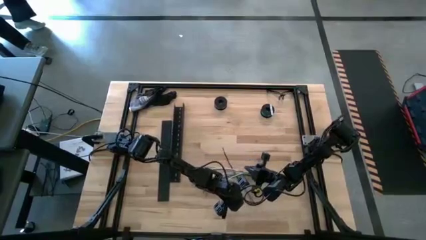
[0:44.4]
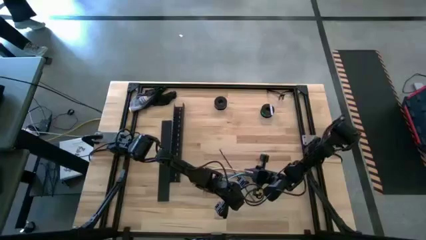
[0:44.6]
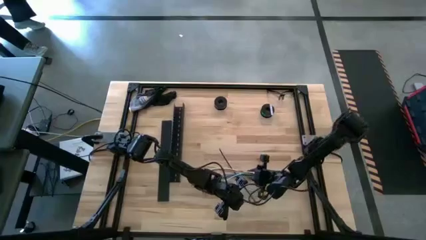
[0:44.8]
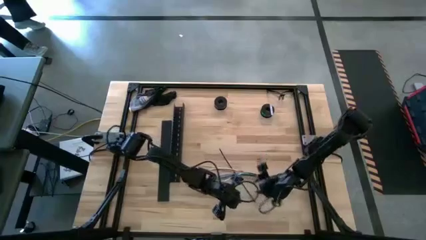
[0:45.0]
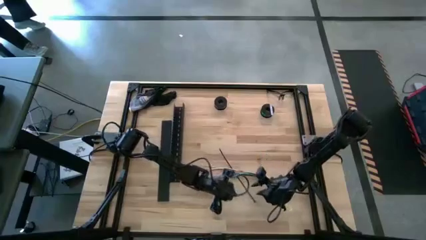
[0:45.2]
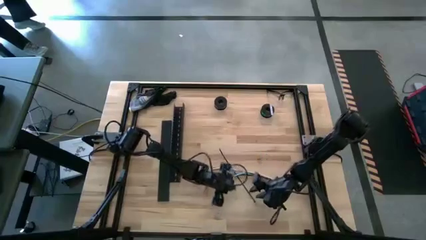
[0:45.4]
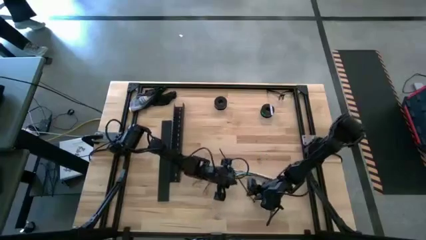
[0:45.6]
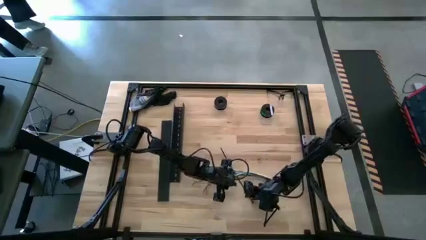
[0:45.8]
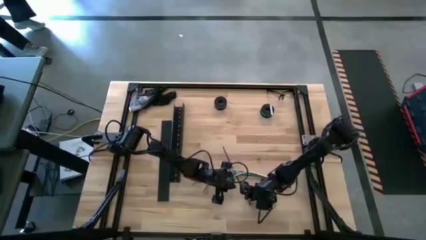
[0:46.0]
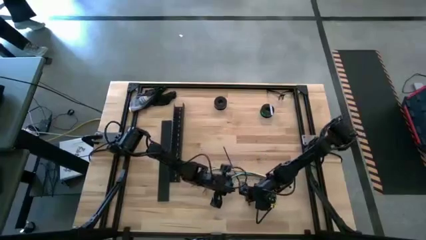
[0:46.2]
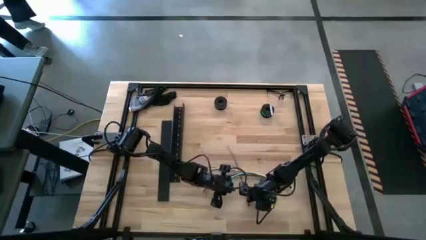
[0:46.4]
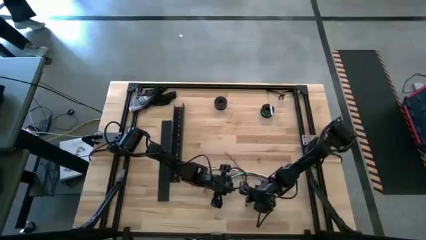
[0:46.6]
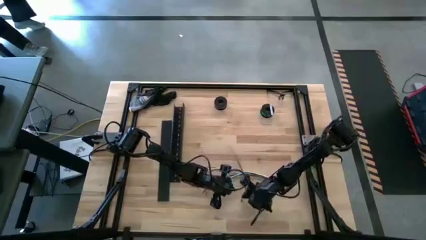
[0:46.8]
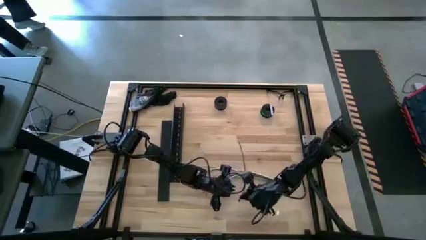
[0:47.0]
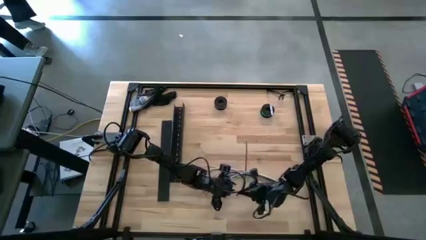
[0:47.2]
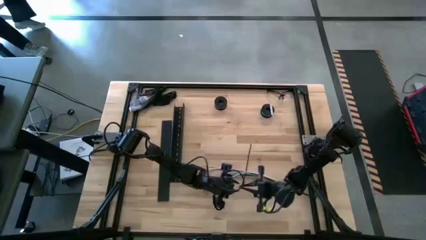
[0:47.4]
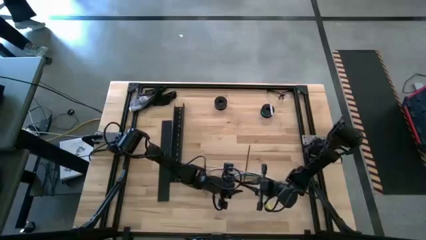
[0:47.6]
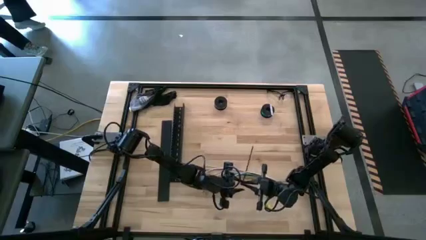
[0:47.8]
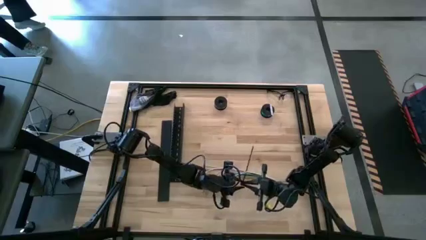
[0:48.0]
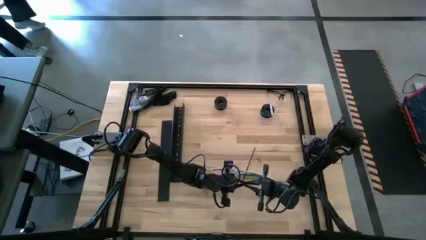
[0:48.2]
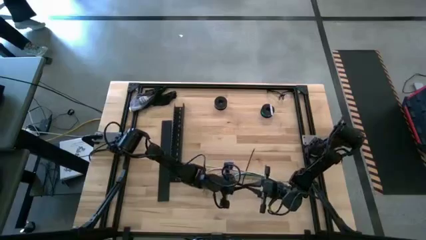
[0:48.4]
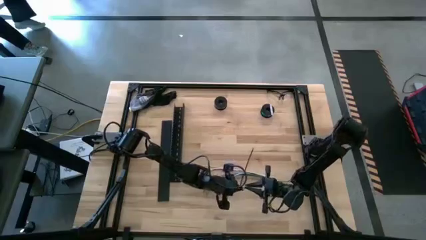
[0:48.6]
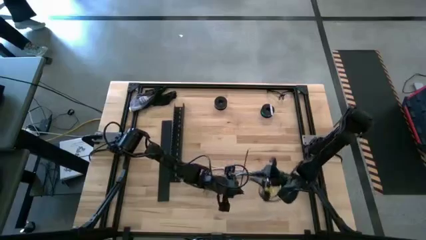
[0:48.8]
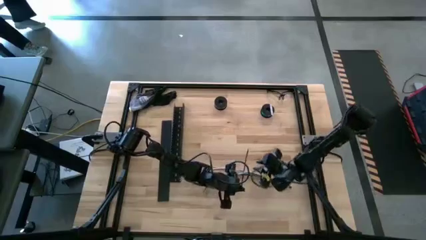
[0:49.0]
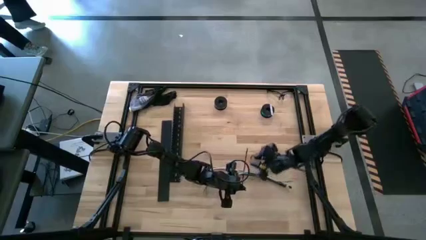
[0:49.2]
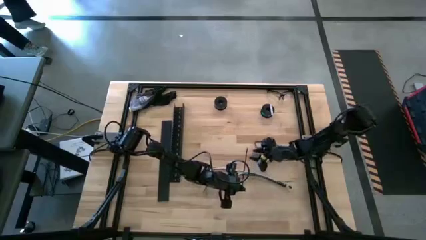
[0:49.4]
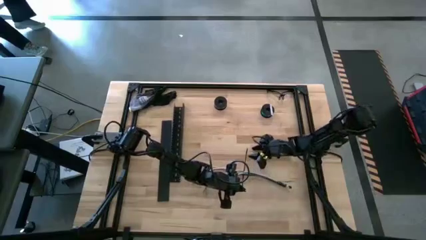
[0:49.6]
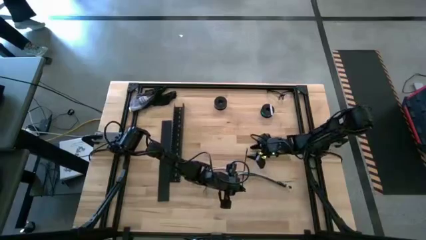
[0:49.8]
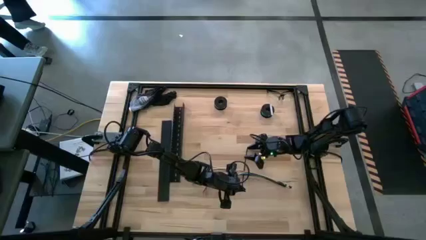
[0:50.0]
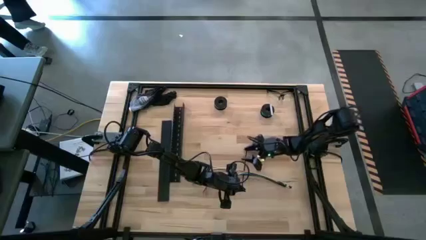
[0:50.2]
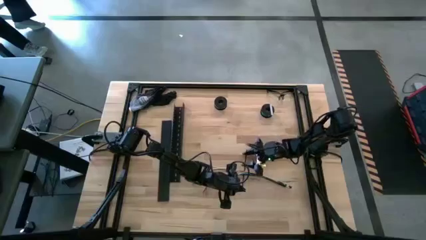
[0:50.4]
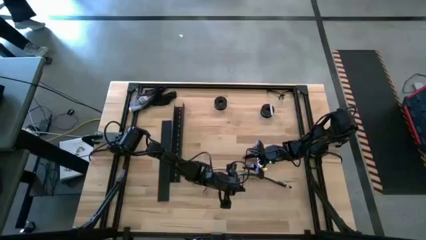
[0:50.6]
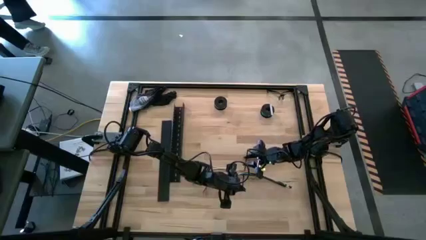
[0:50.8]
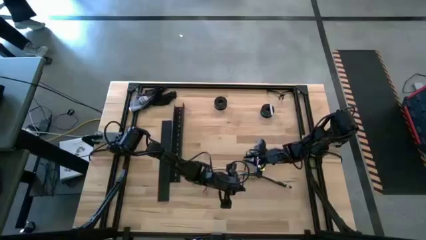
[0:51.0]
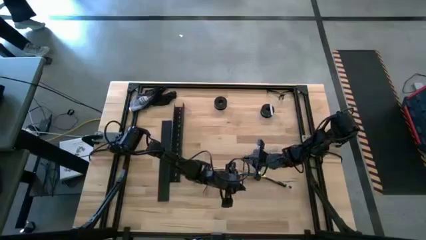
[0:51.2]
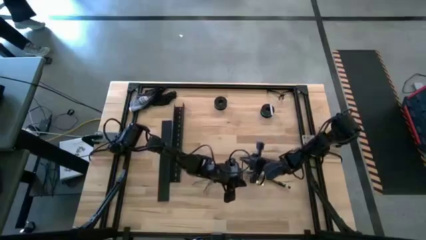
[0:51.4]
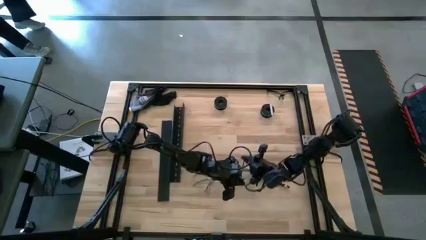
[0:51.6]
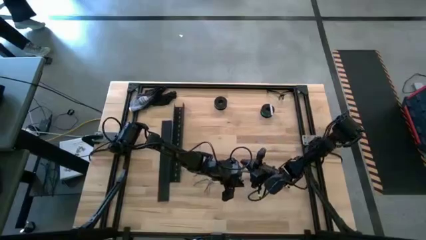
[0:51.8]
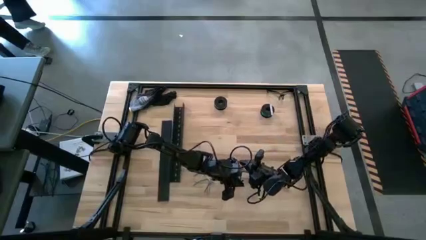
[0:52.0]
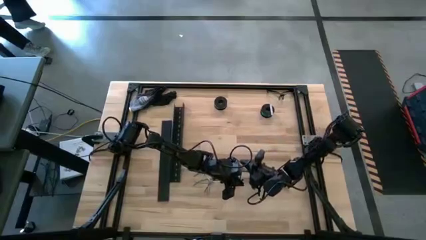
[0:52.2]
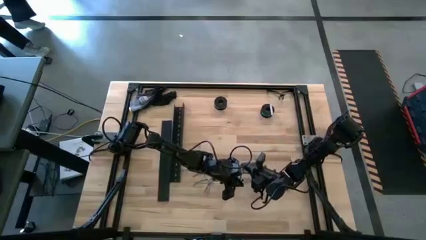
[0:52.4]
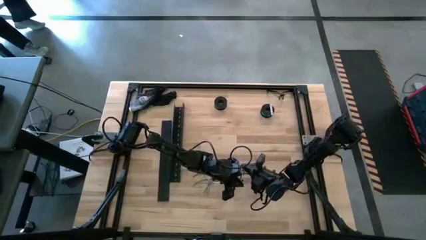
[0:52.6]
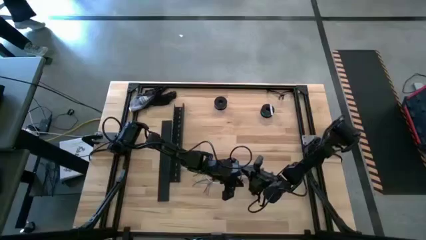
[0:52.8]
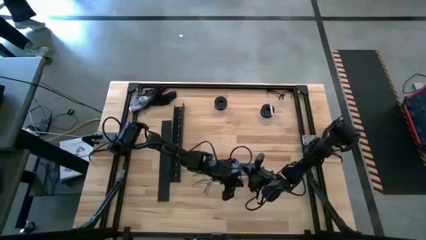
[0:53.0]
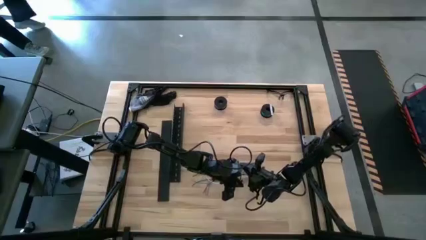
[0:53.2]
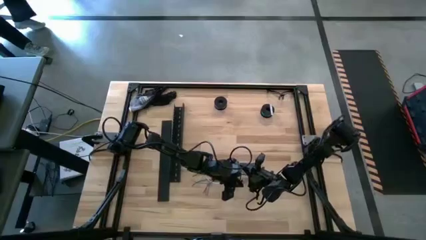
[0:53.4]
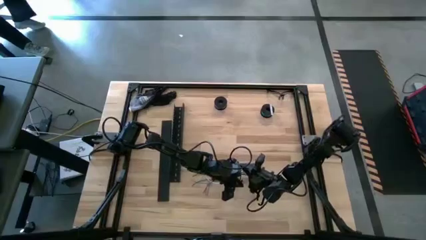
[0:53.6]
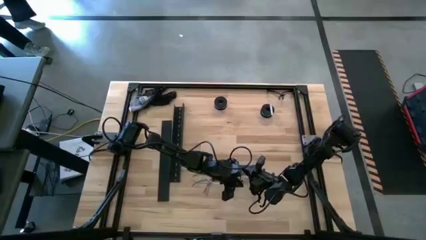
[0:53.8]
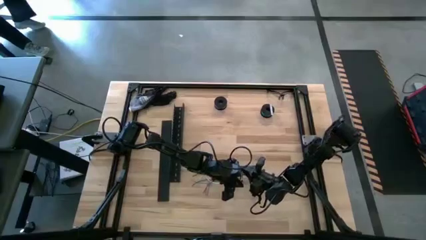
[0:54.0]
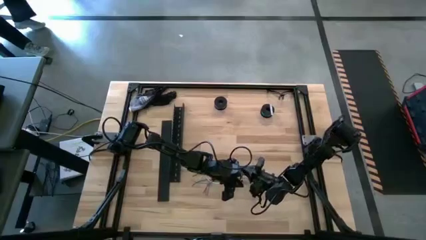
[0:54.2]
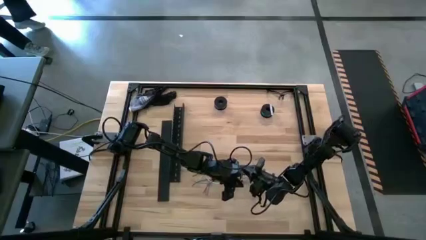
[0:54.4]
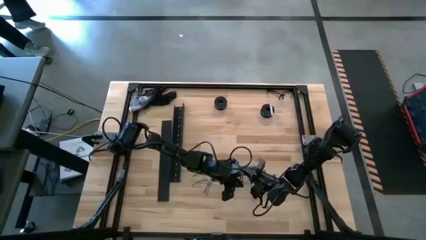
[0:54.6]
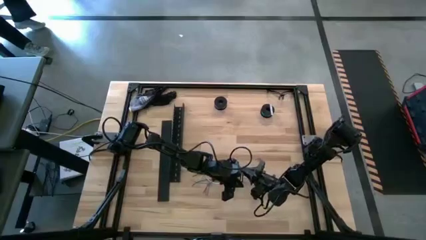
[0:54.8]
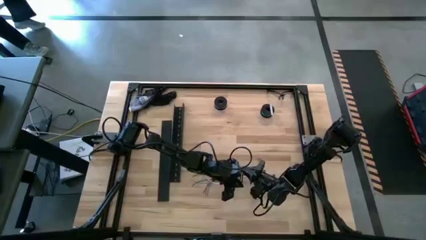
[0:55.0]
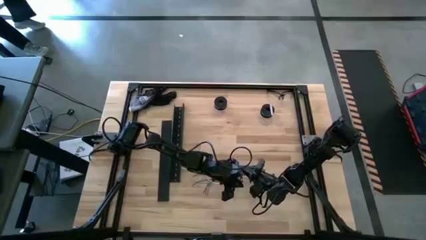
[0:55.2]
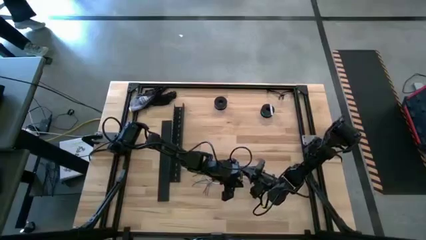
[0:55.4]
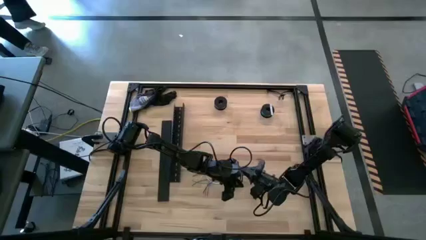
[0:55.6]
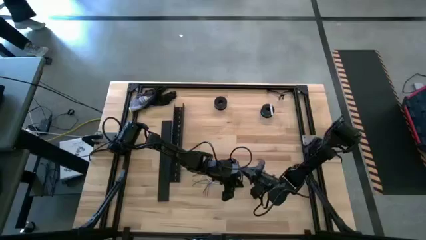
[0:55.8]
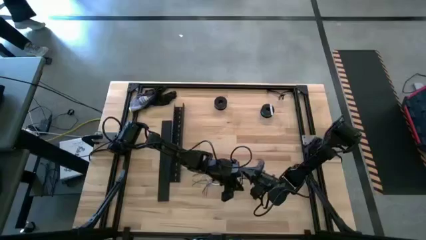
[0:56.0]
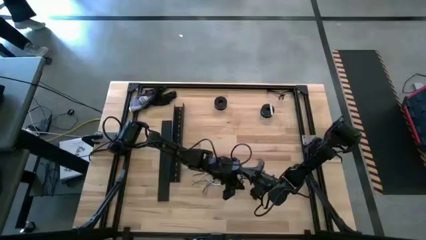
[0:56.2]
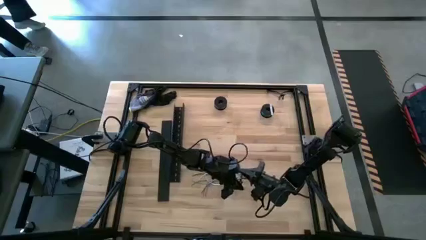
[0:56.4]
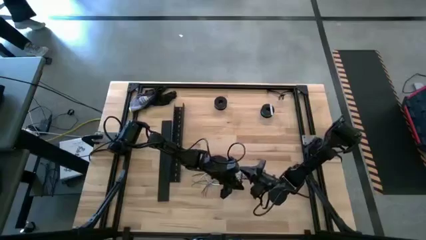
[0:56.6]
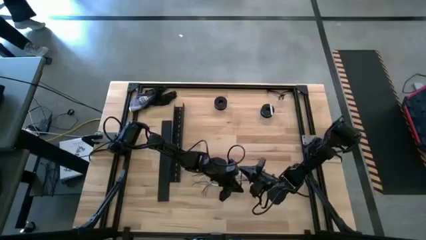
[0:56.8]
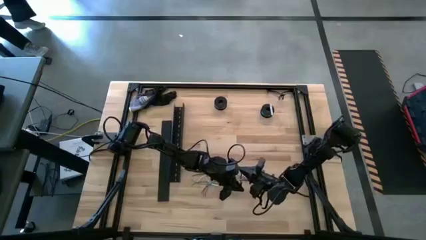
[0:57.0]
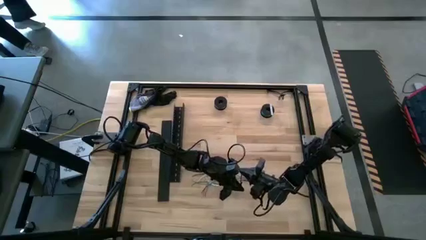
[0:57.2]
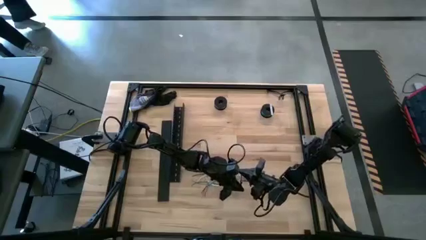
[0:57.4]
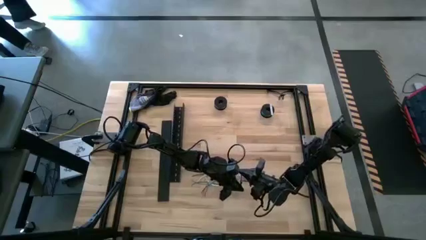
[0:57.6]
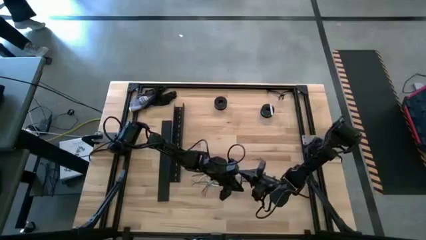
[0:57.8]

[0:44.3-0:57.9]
Task: Ziptie cables
Wrap the black zip tie on the cable
